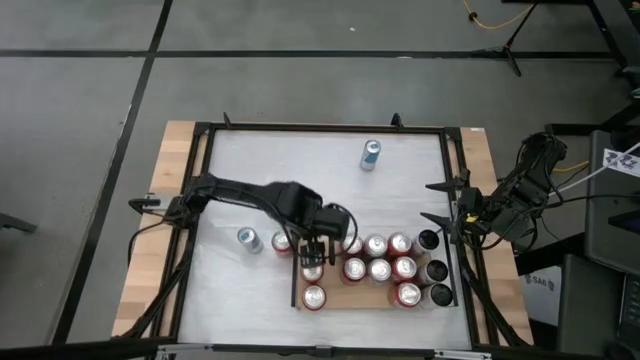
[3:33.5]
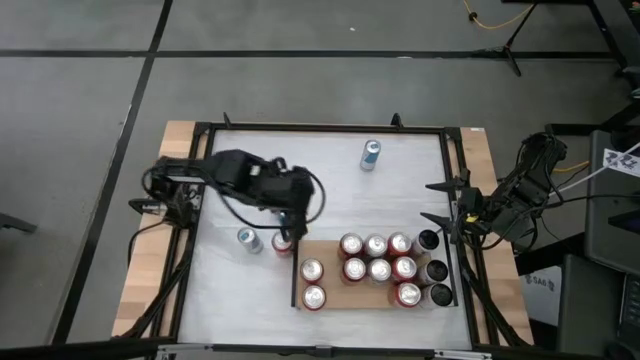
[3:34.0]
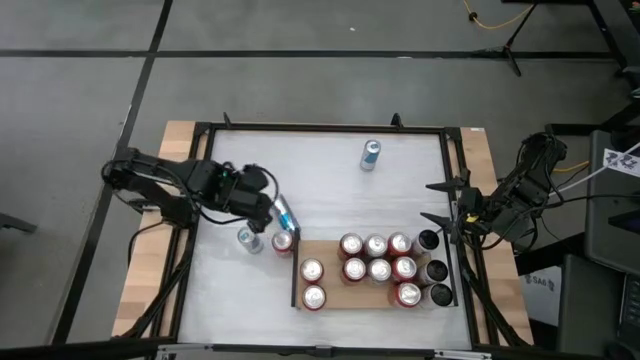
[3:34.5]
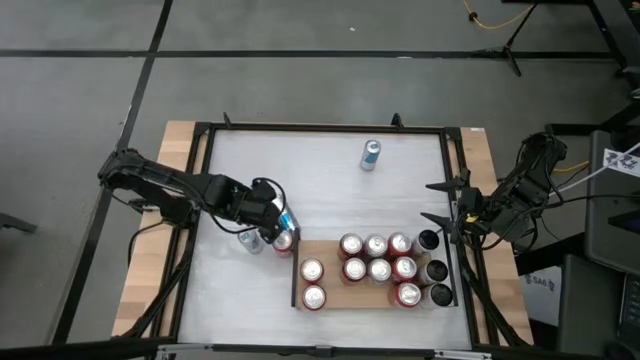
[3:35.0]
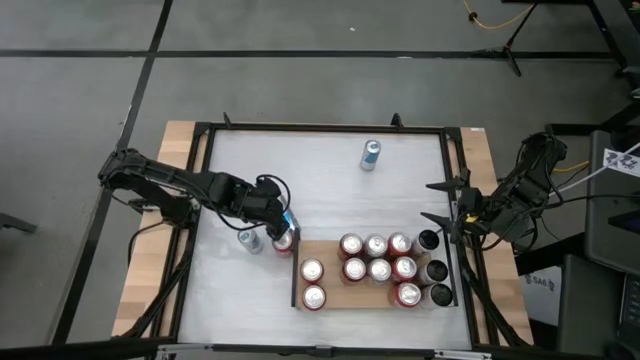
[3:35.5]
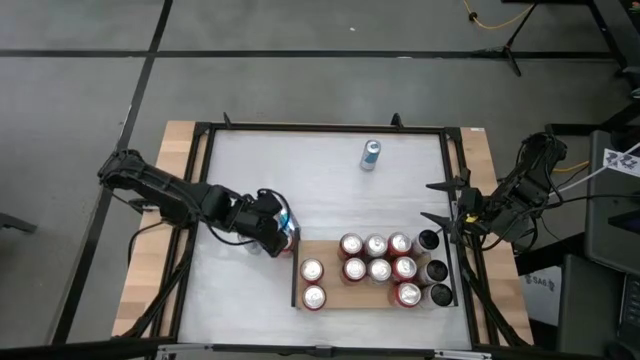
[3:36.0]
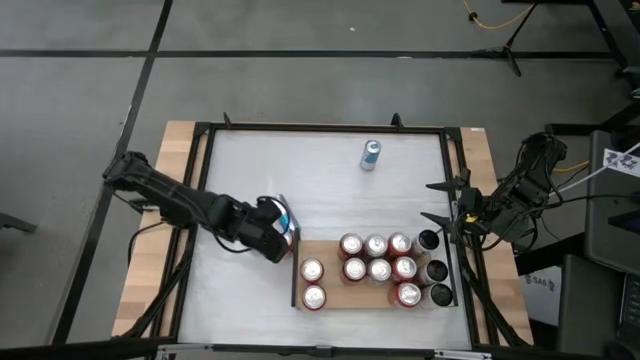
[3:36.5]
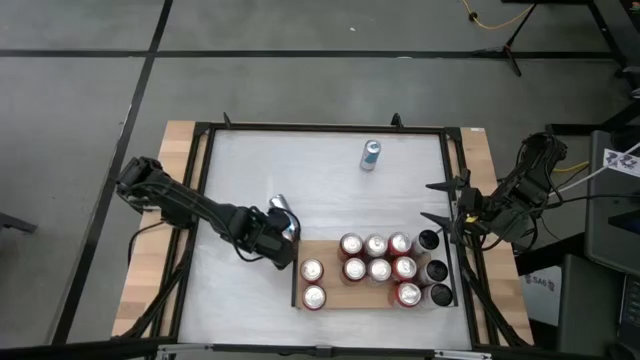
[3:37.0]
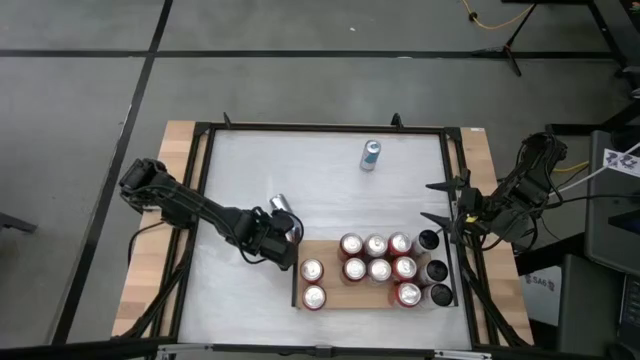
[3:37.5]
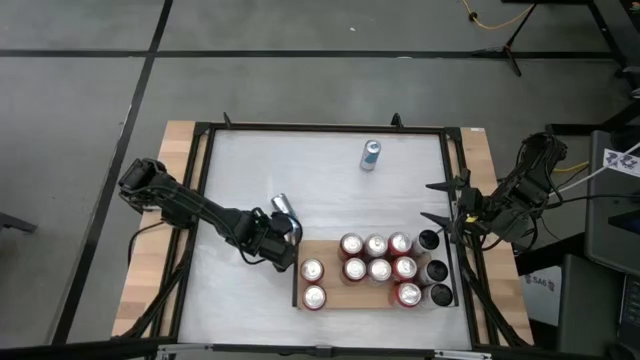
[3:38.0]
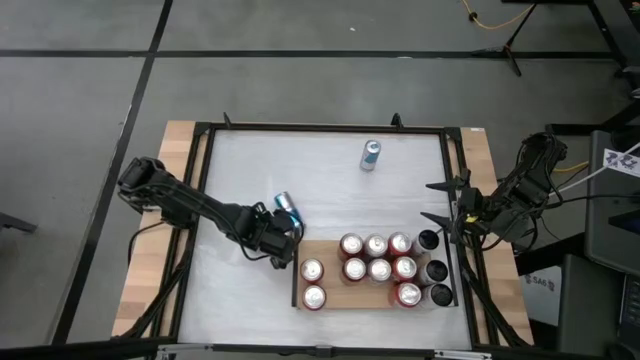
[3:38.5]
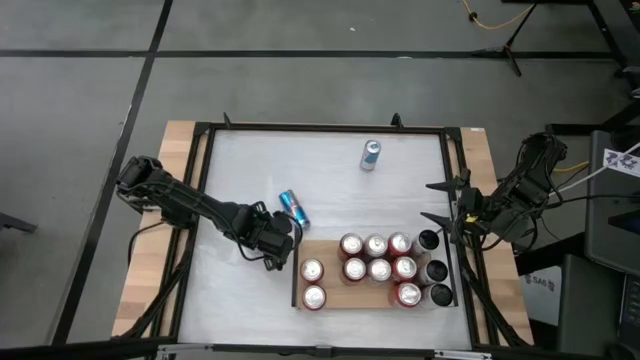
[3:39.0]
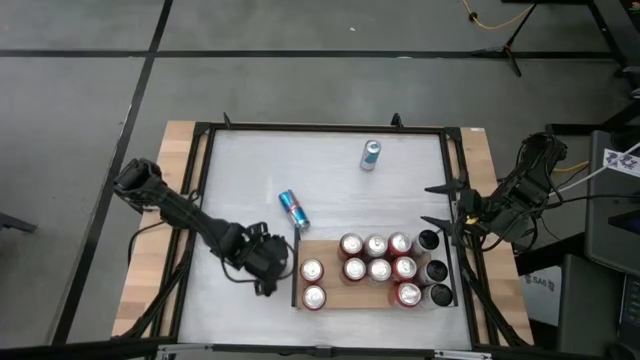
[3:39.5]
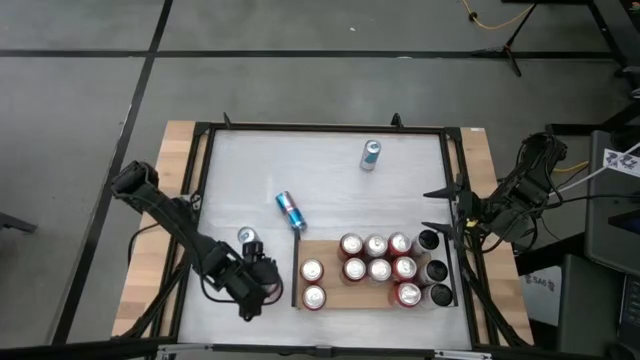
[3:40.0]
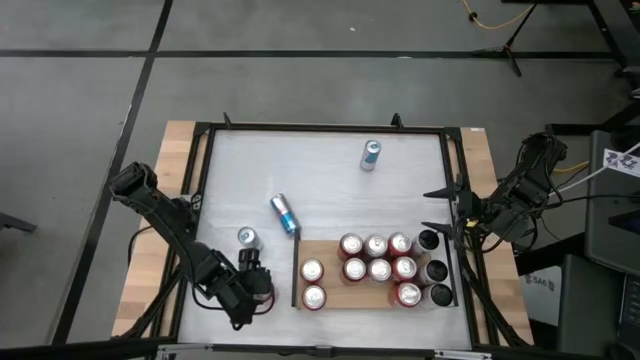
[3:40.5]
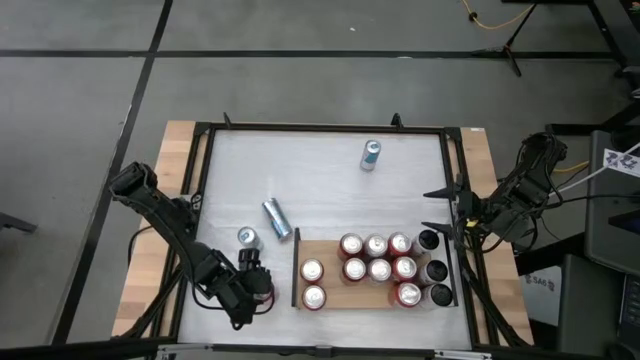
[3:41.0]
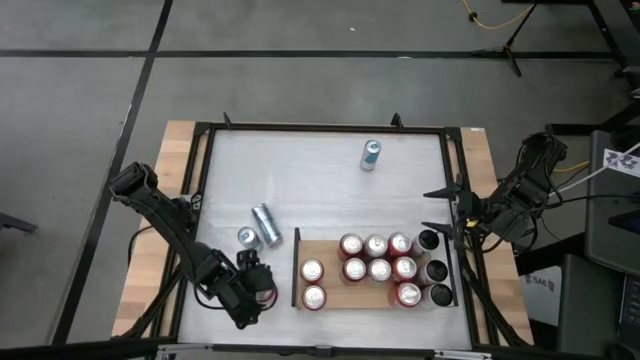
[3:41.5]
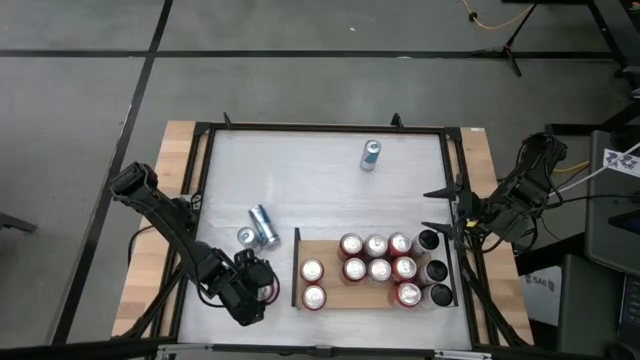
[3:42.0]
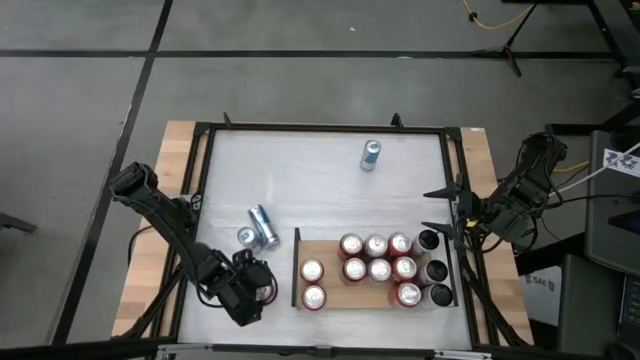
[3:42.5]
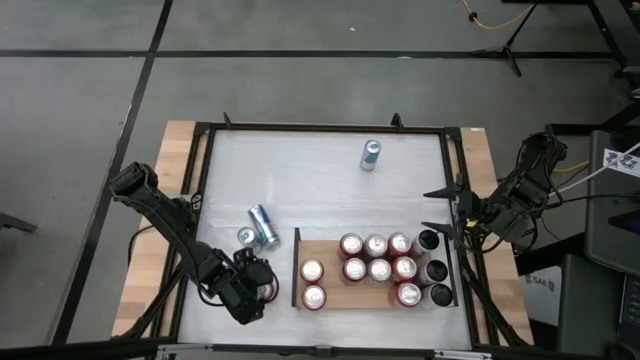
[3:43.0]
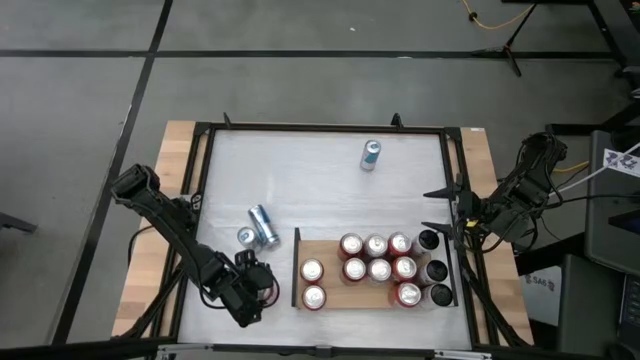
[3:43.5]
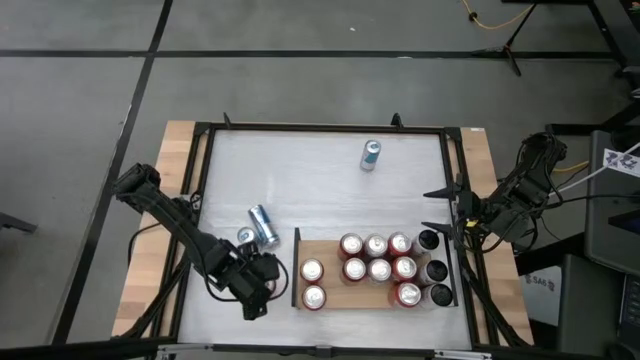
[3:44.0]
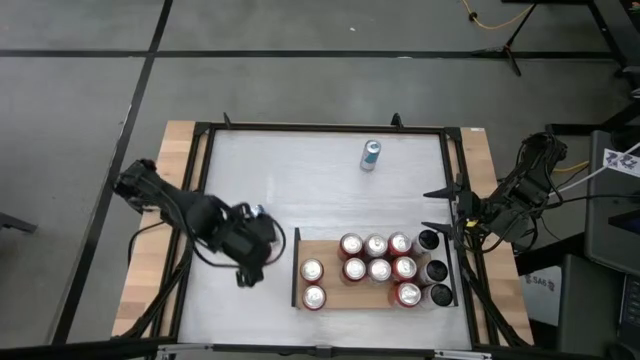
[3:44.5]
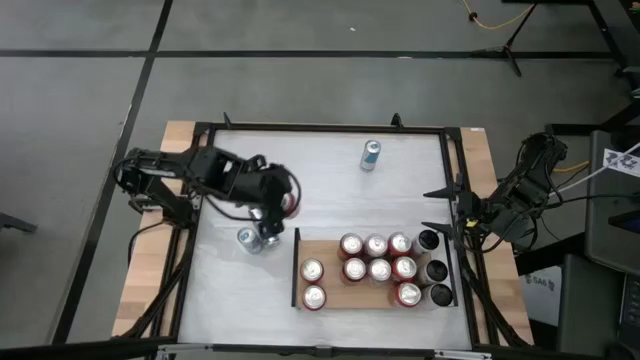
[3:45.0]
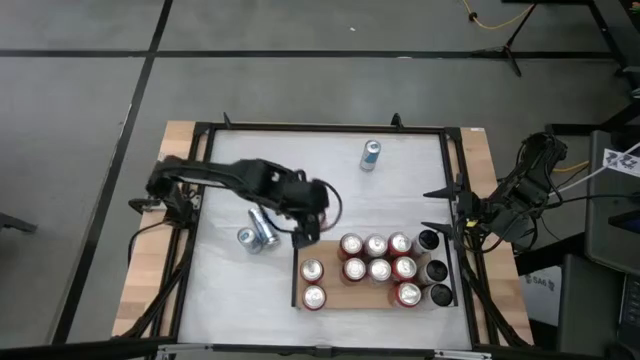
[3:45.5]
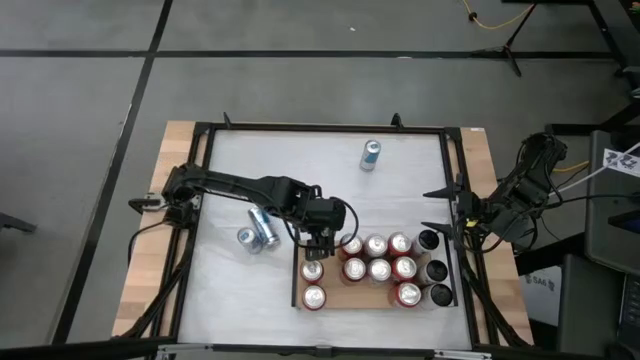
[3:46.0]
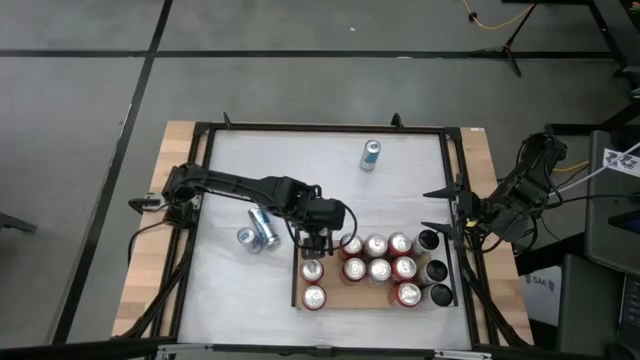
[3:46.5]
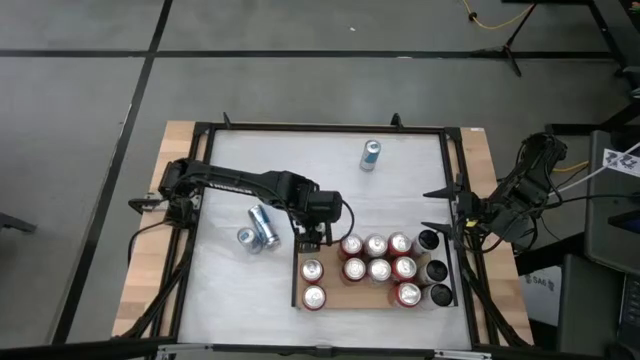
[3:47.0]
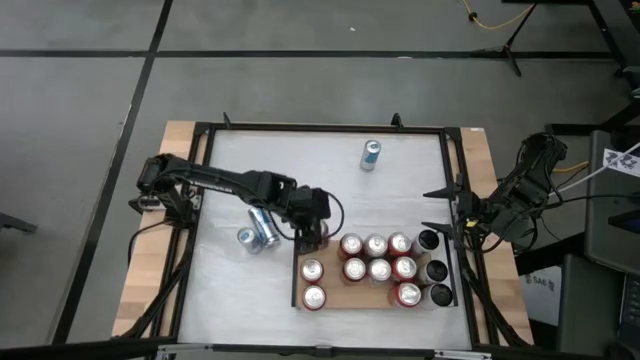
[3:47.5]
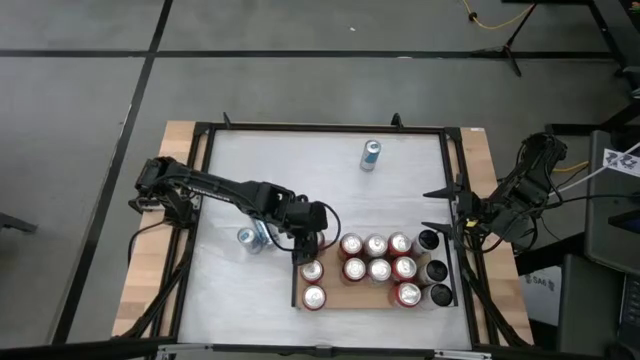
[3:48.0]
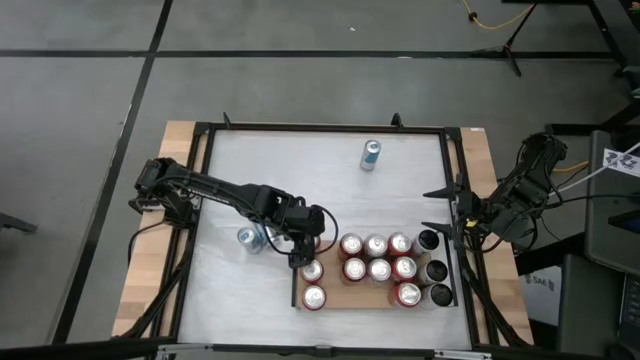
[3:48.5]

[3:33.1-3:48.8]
Task: Place canned beverage on shelf
Put the orange soda can on the shelf

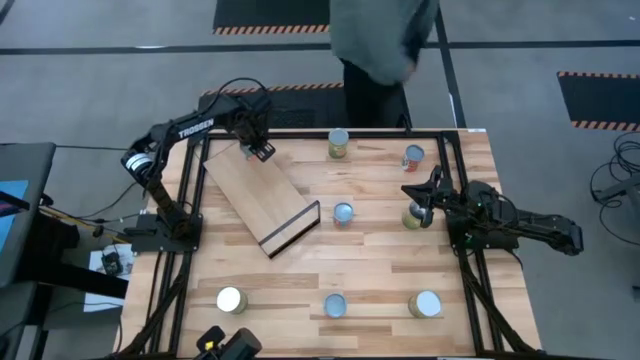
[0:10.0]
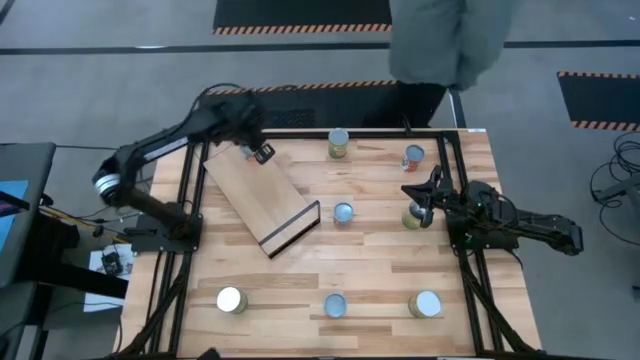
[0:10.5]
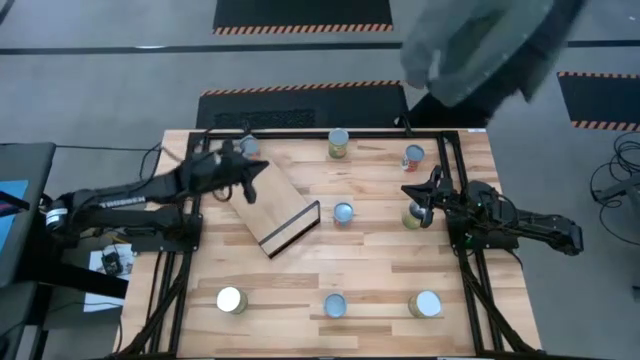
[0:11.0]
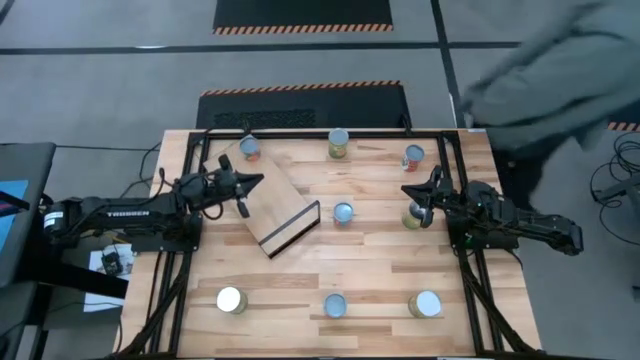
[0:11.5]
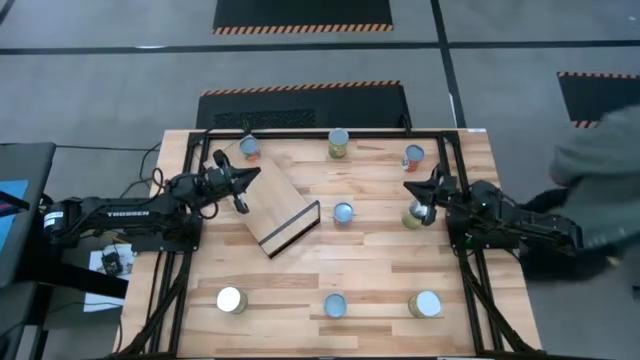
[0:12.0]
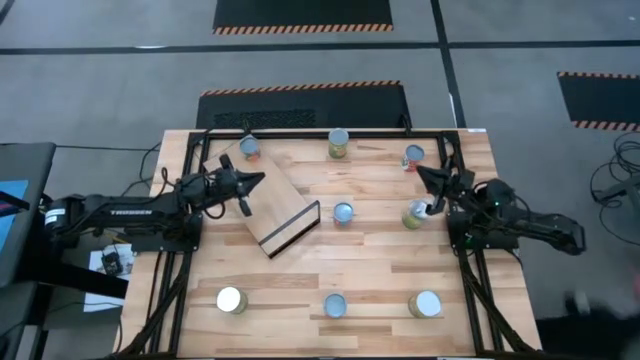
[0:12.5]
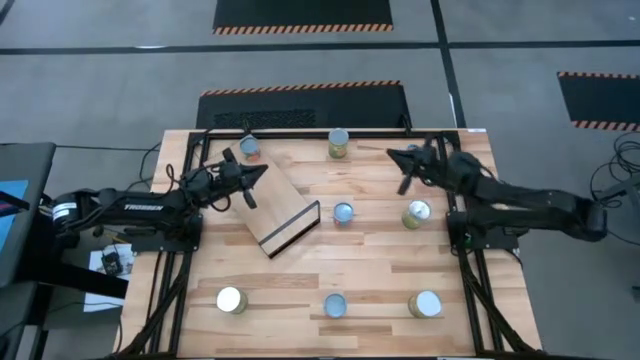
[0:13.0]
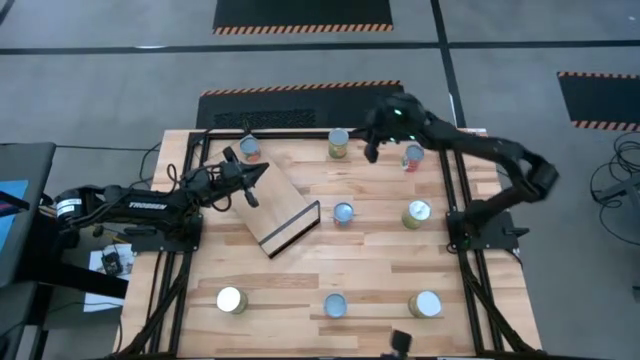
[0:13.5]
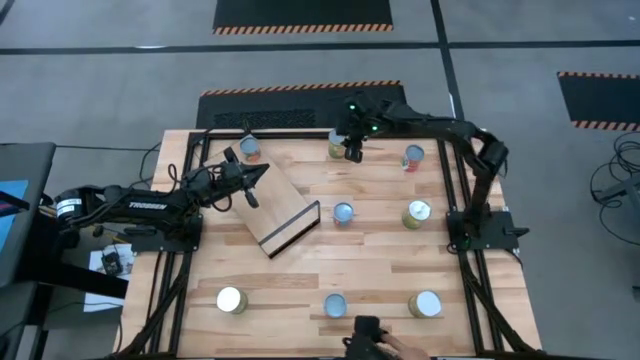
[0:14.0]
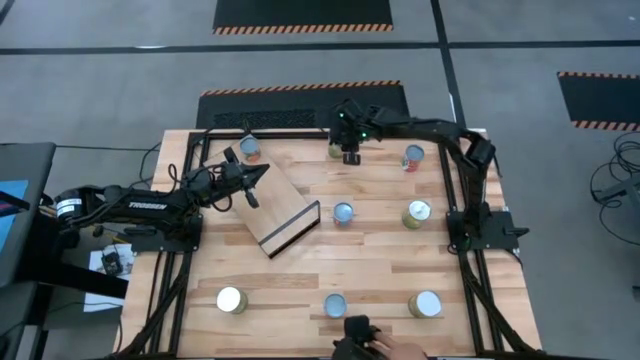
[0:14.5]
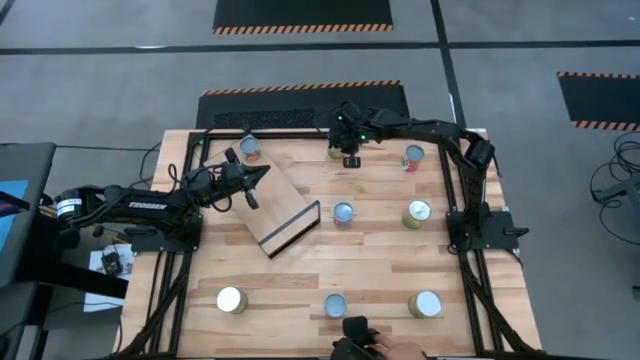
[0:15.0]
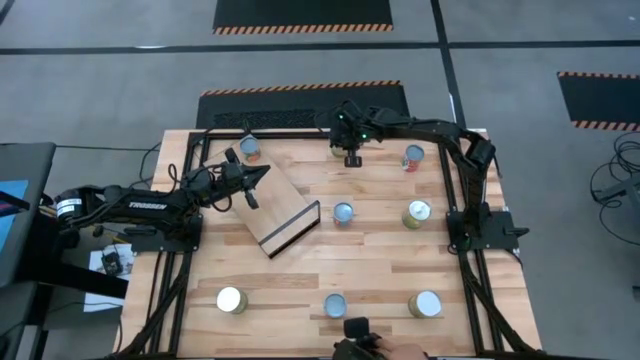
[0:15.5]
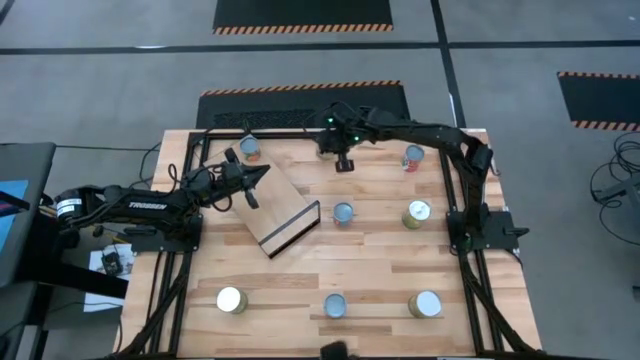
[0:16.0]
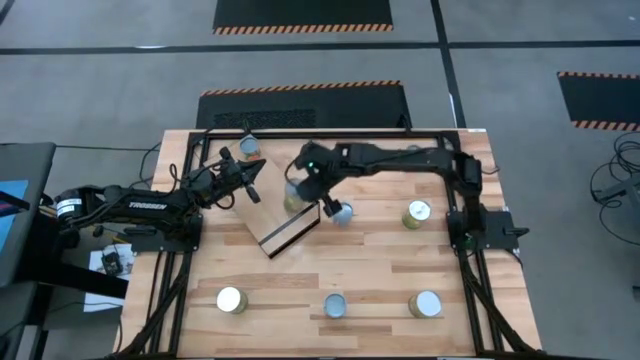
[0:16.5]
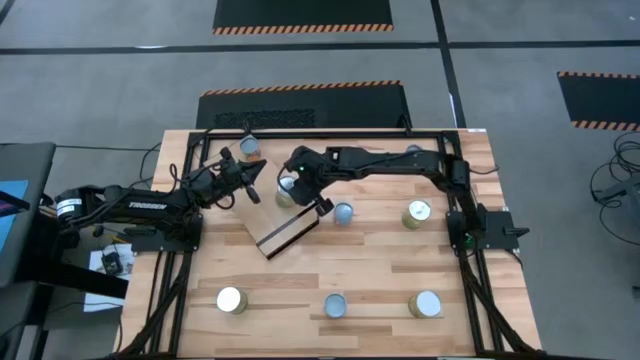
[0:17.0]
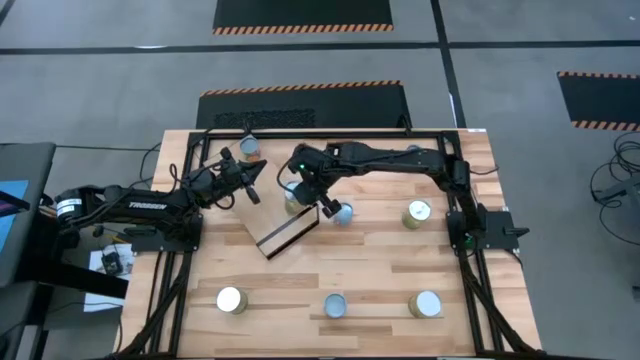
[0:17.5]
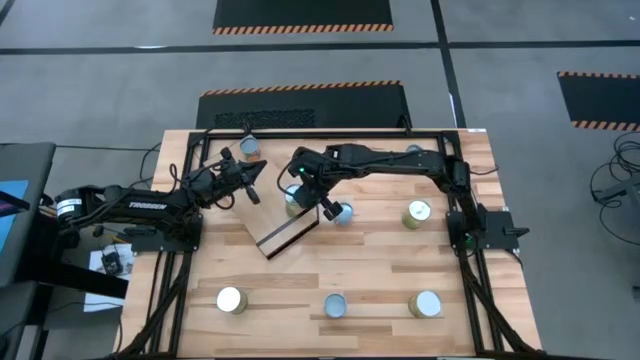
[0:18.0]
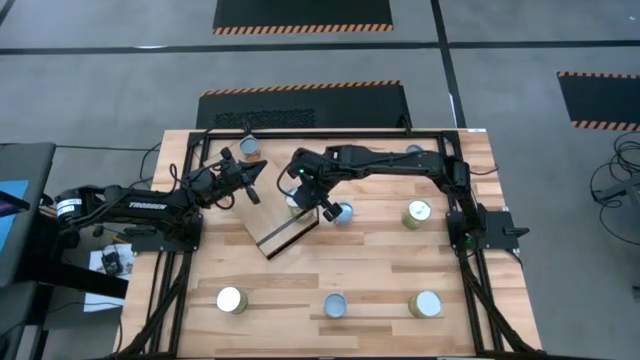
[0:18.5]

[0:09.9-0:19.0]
Task: Pick and place cans onto a shelf
Put the top large canned oranges on the shelf
